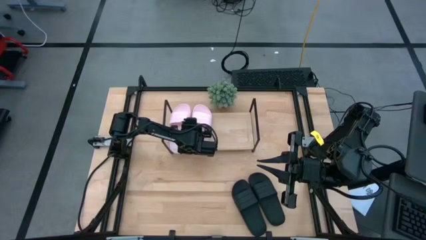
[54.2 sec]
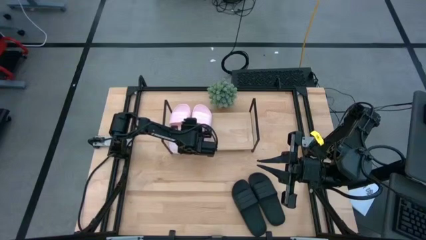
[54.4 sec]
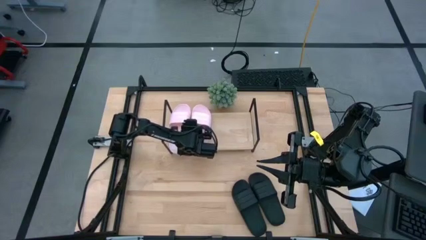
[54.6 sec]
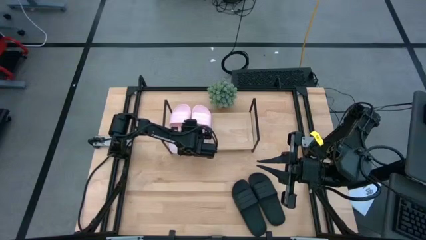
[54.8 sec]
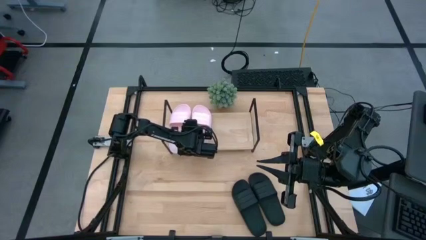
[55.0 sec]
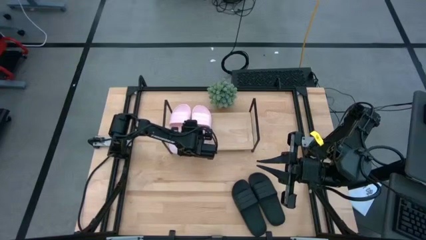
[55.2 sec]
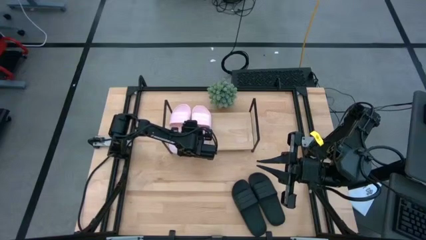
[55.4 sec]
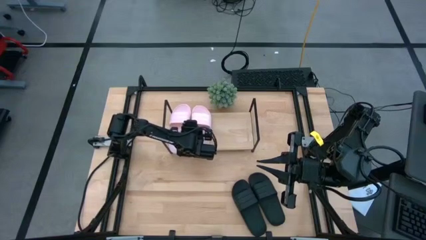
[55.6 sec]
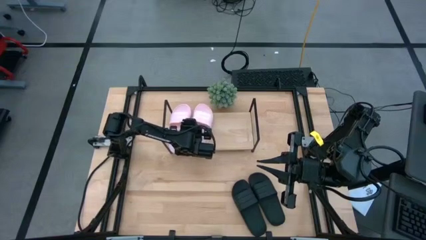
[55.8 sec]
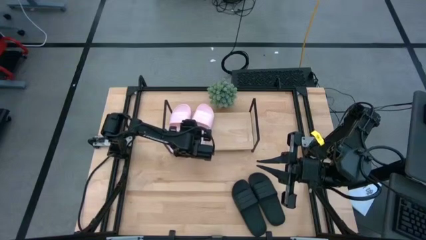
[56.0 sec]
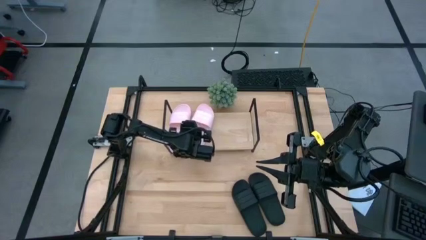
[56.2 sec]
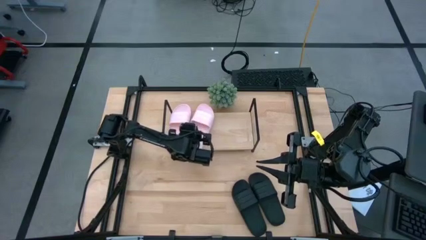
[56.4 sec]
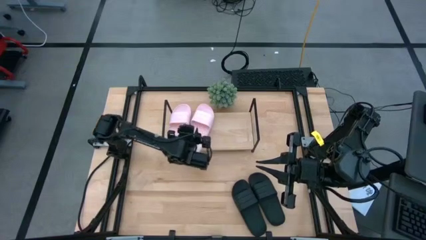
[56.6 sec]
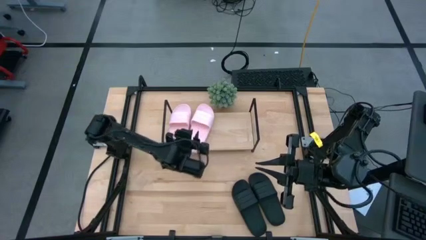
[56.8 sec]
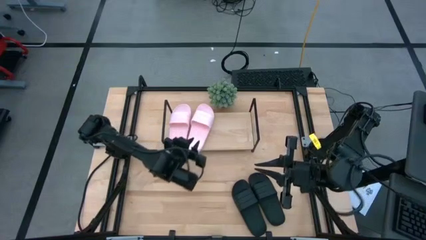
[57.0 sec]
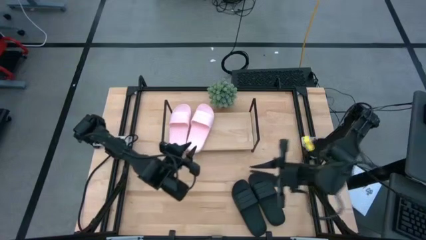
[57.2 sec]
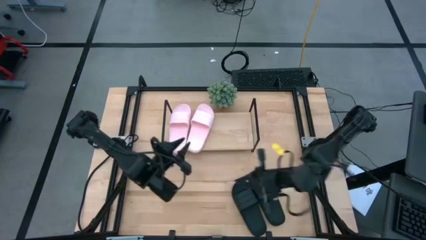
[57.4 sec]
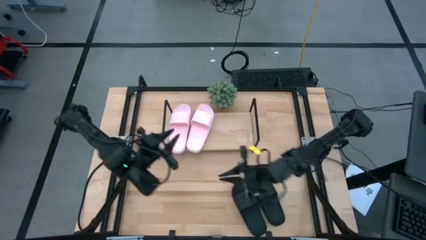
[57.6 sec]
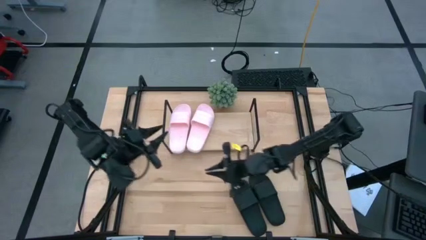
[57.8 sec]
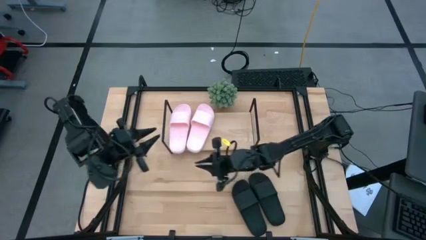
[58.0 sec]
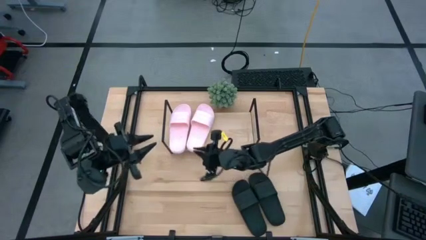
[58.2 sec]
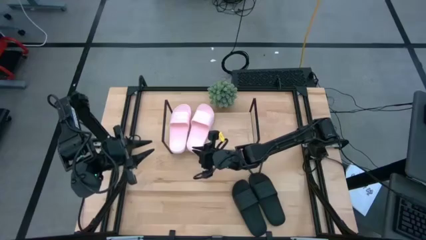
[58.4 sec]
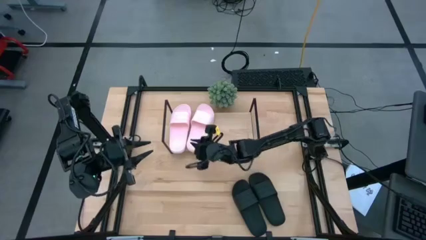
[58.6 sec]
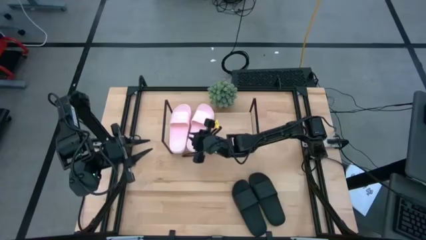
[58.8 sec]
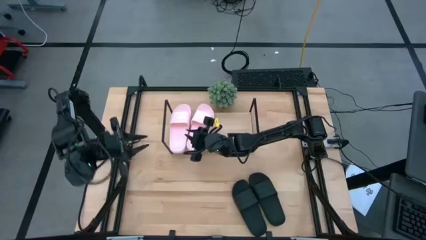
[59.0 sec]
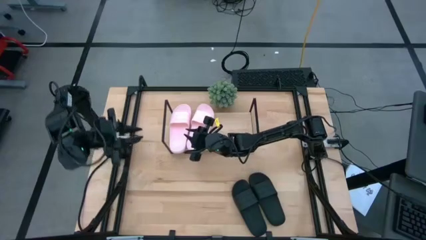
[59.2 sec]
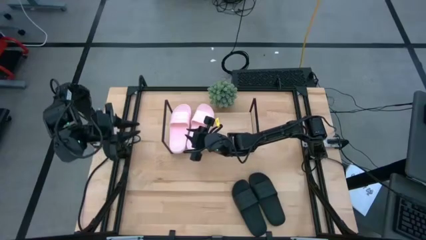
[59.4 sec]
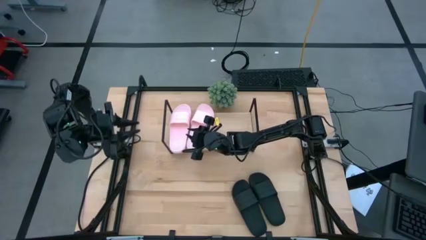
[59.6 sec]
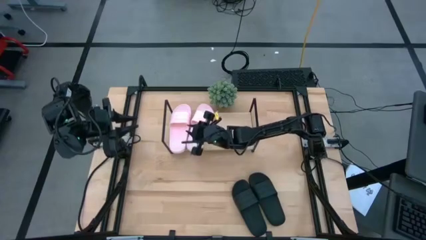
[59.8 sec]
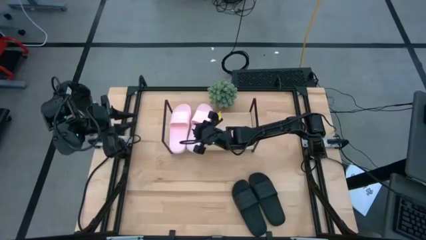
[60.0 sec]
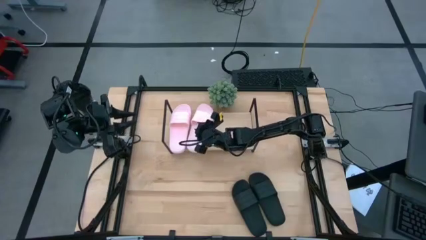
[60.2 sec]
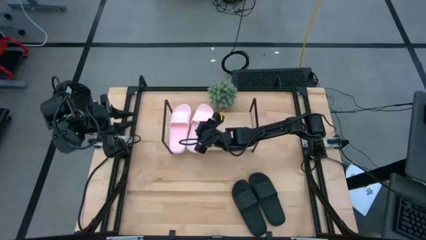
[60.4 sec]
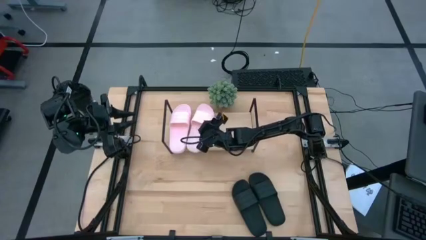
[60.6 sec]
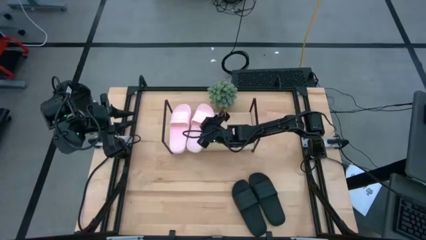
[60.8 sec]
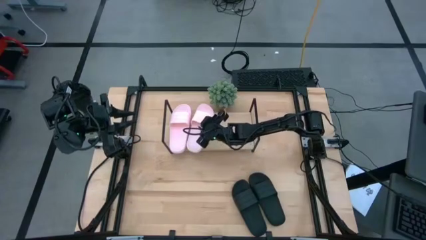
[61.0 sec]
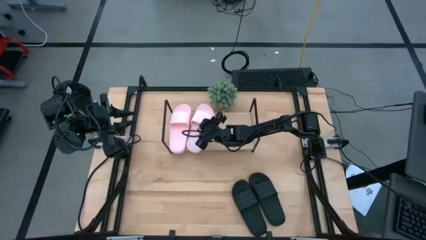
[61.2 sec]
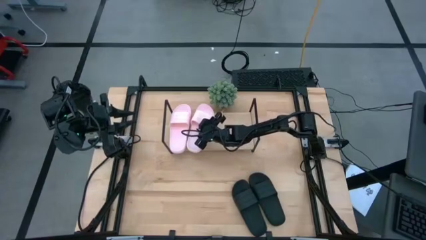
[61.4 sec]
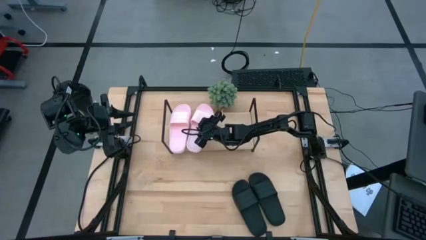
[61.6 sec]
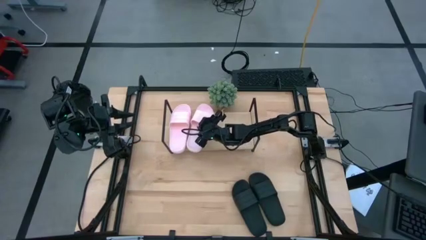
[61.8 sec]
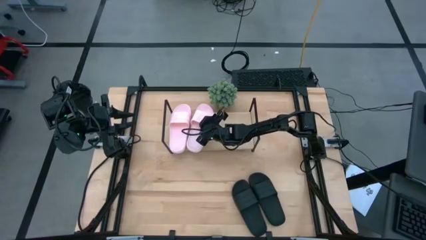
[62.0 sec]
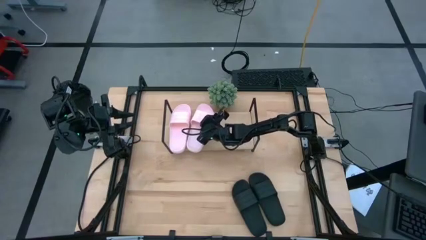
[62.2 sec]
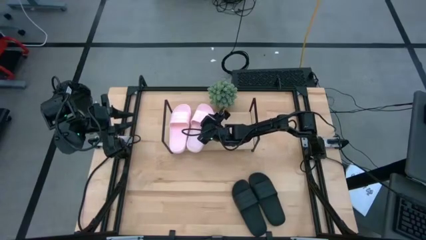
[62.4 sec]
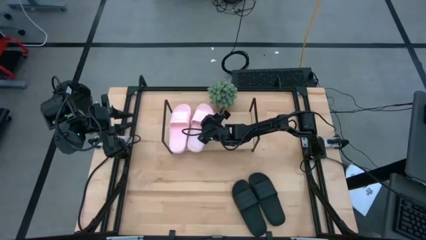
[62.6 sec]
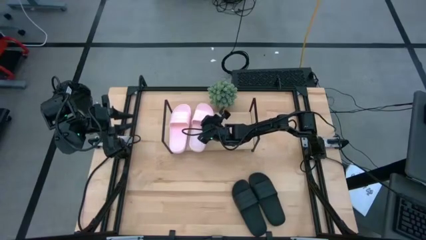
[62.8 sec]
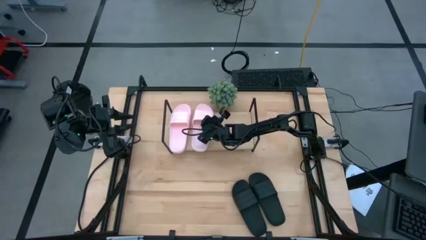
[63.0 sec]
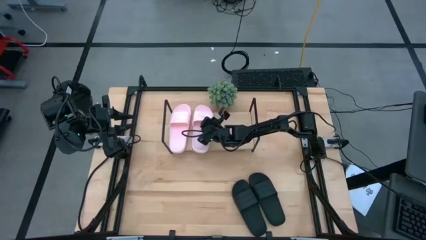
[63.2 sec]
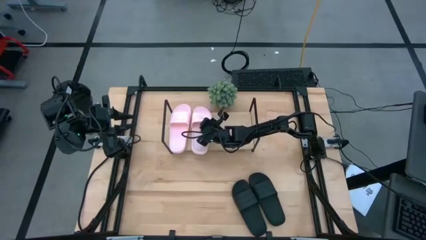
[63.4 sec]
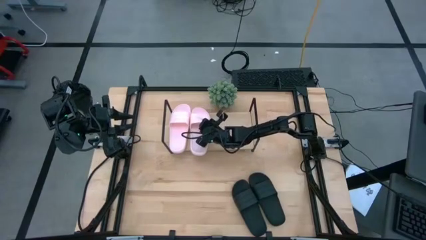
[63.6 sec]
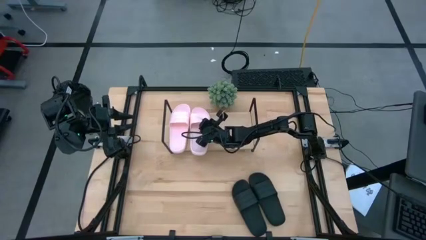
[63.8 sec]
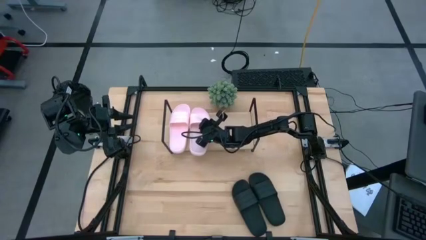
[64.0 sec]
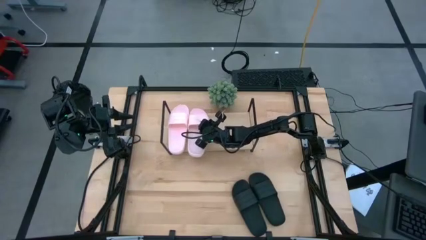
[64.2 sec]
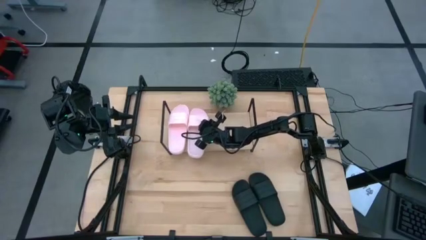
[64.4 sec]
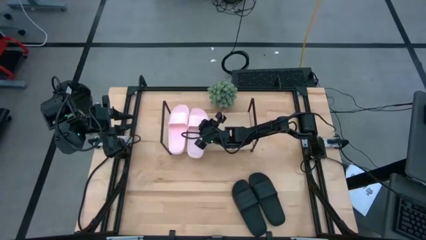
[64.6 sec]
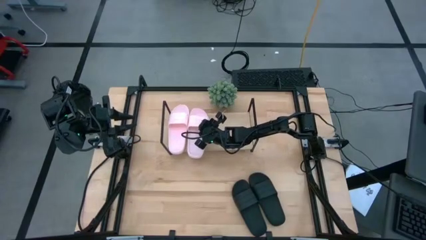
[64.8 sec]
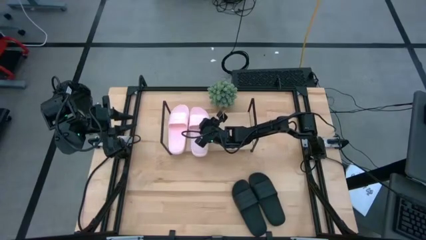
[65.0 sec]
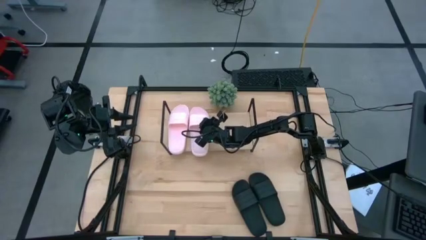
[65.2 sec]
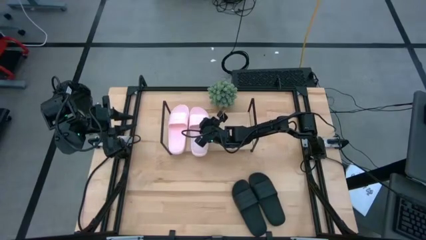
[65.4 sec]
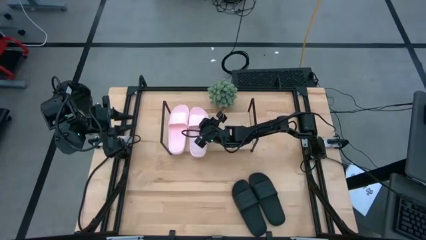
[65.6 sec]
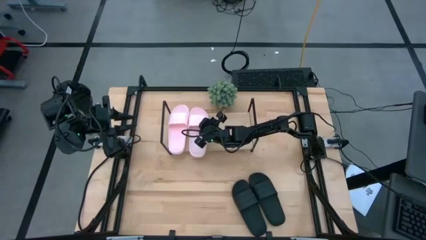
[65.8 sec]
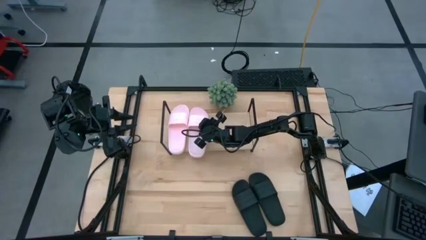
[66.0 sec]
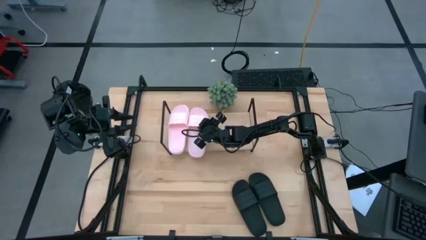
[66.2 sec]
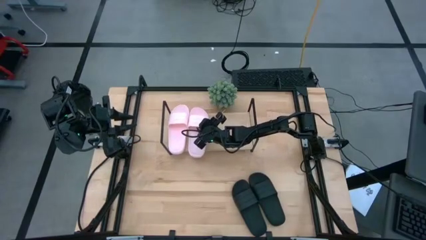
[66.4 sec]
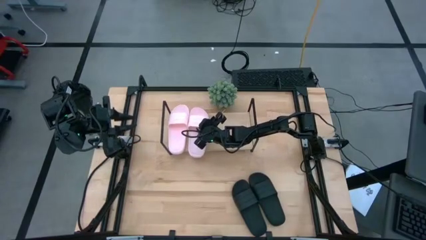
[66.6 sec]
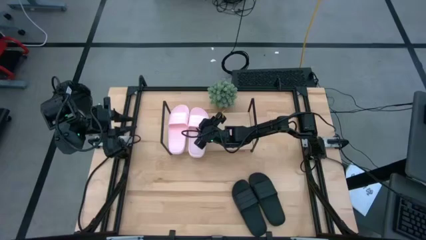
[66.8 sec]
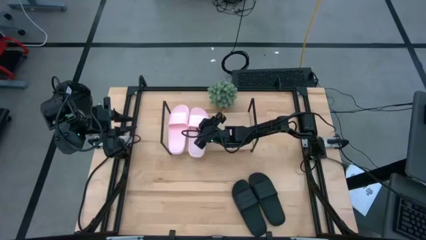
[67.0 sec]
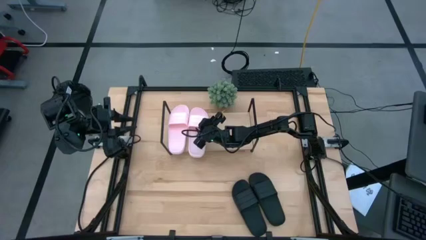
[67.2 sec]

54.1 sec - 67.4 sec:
Task: Pick and place slides into the shelf
Put the pink slide on the shelf
